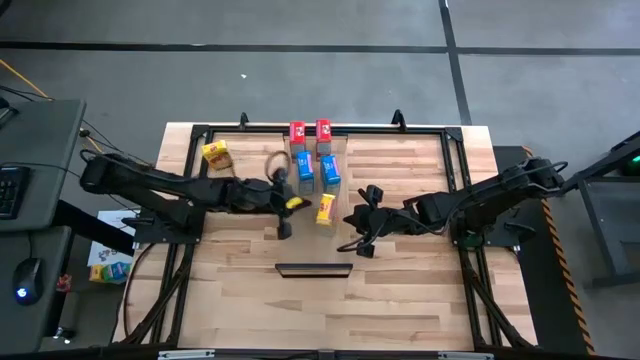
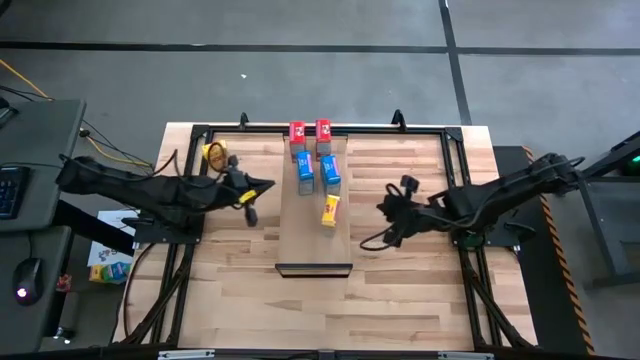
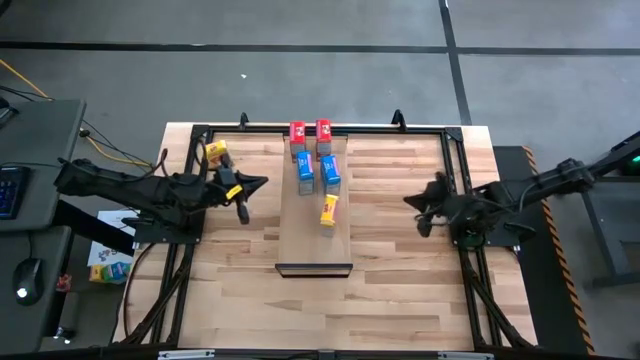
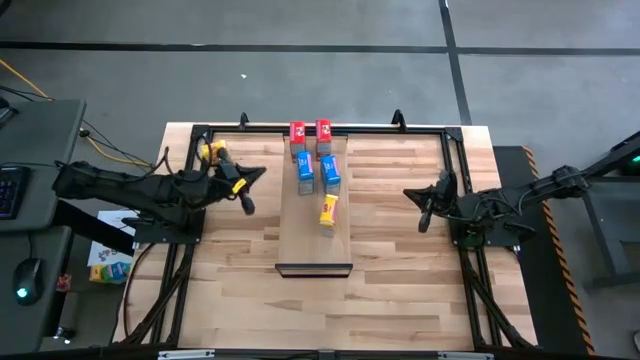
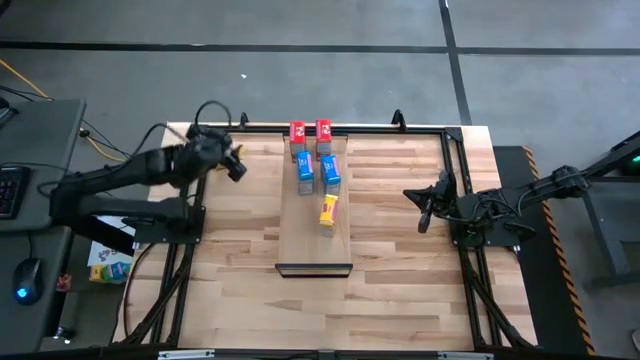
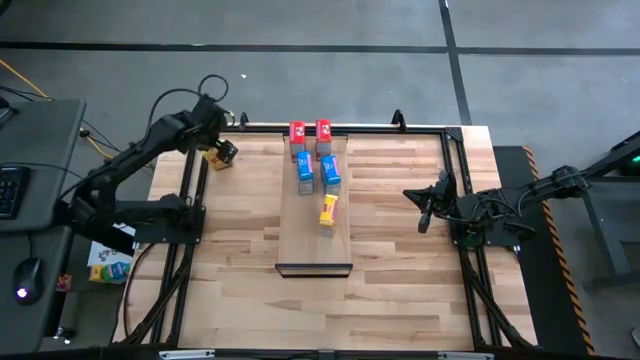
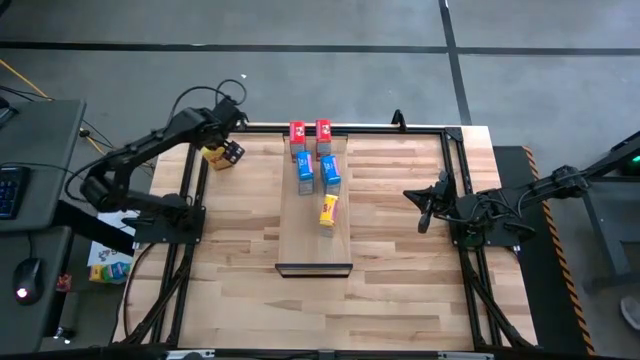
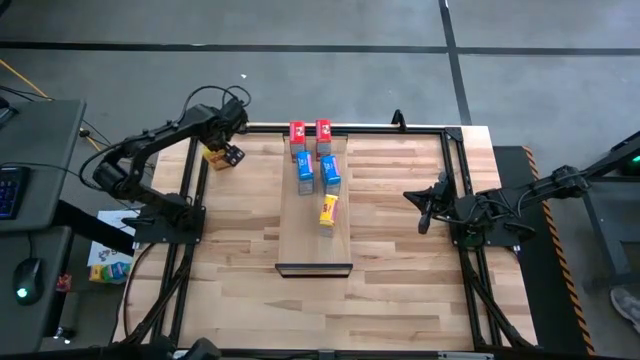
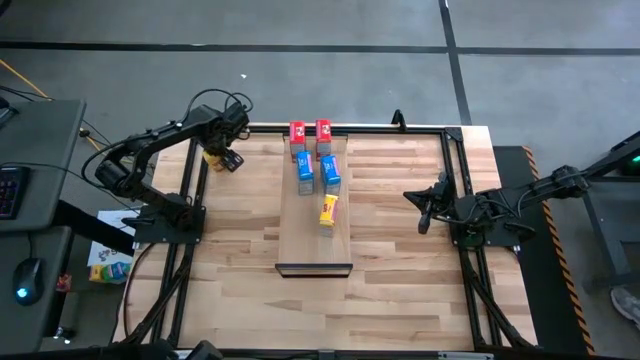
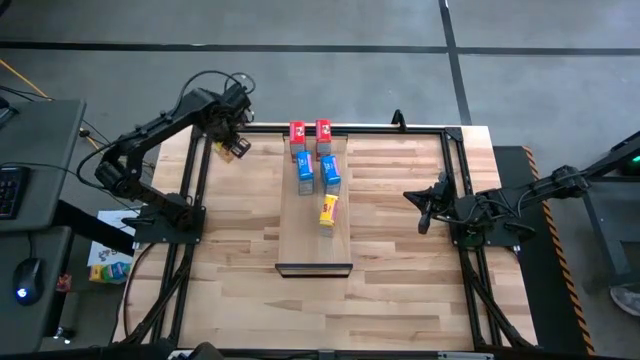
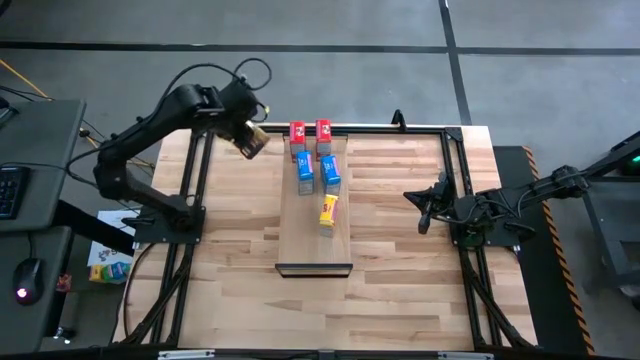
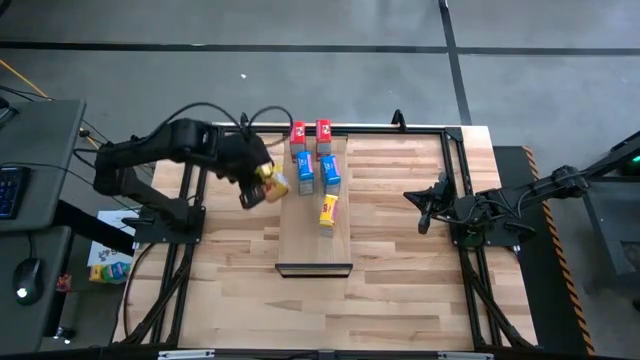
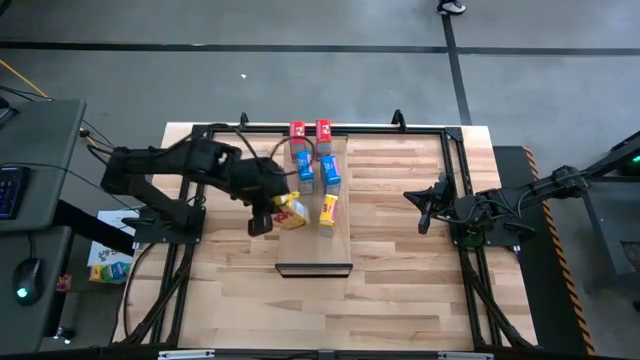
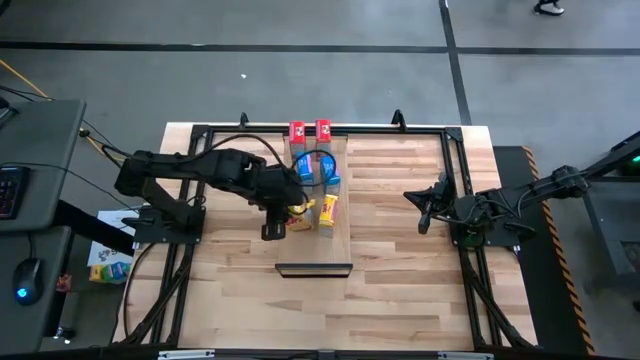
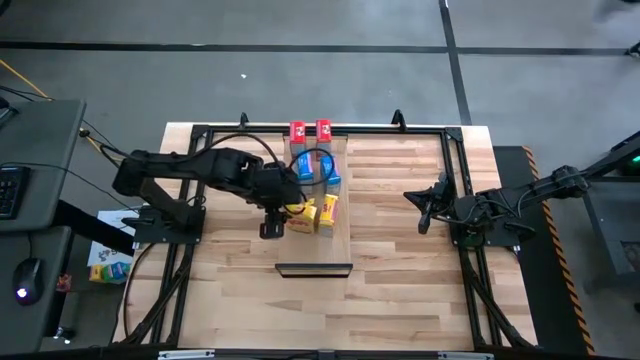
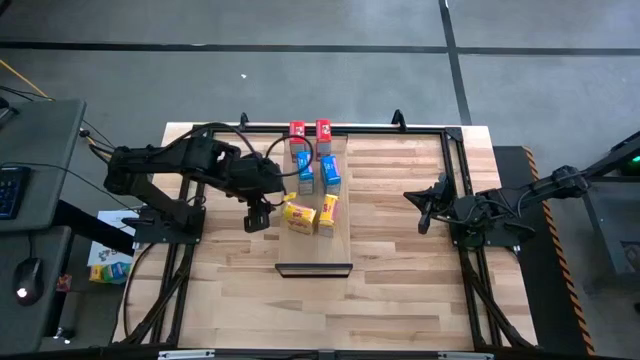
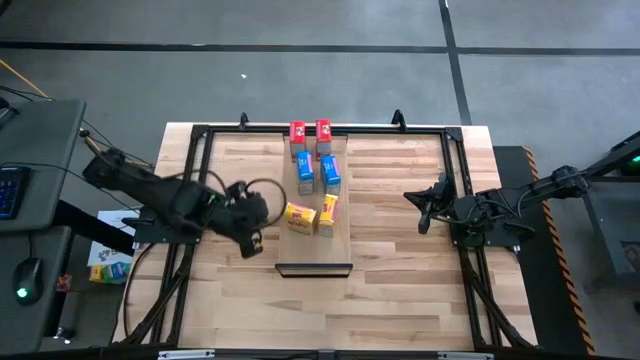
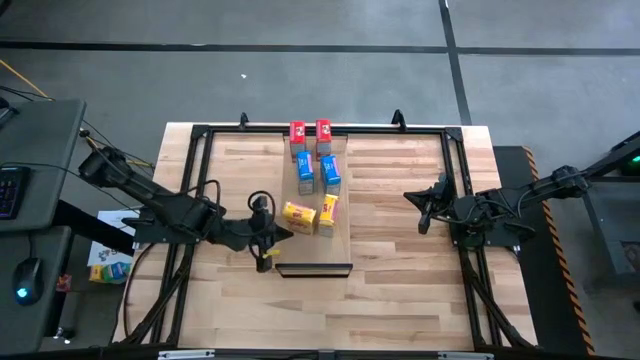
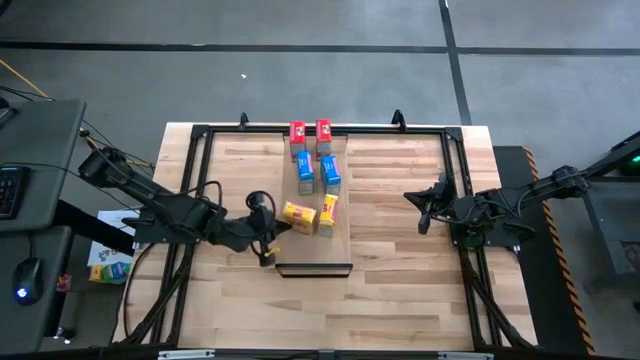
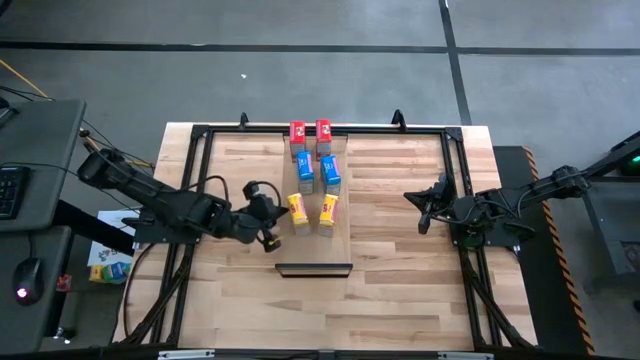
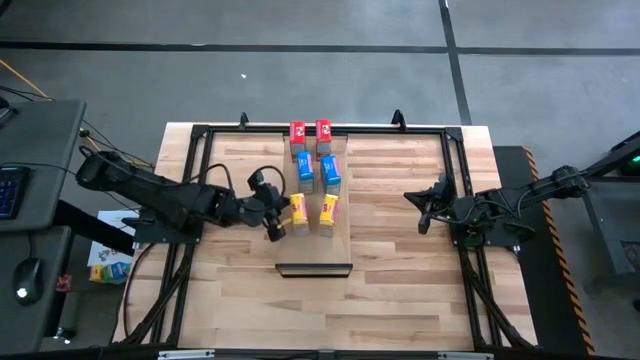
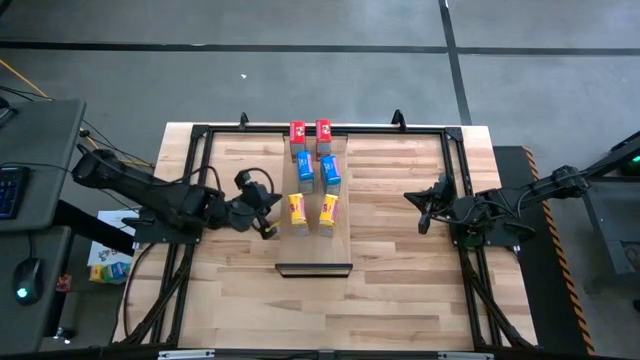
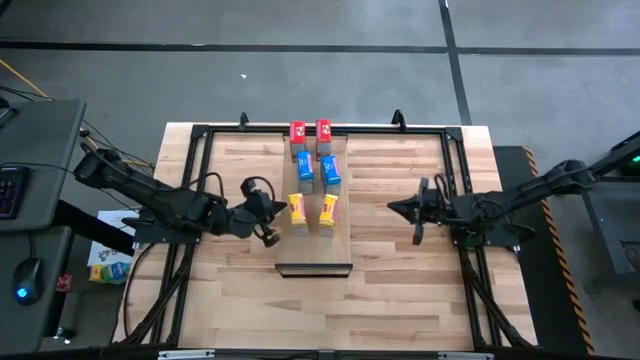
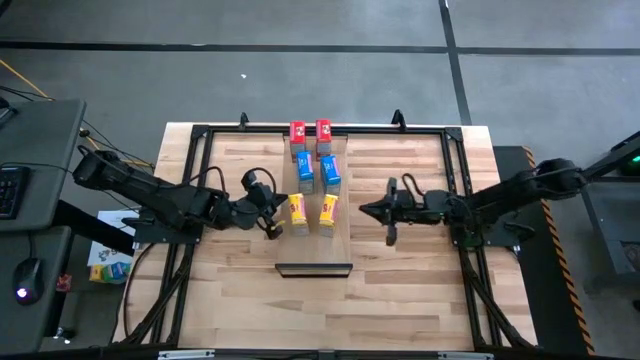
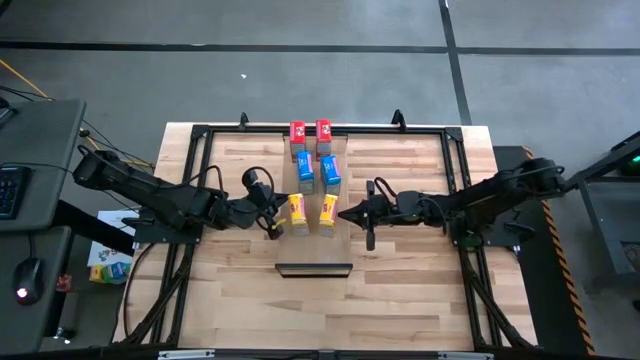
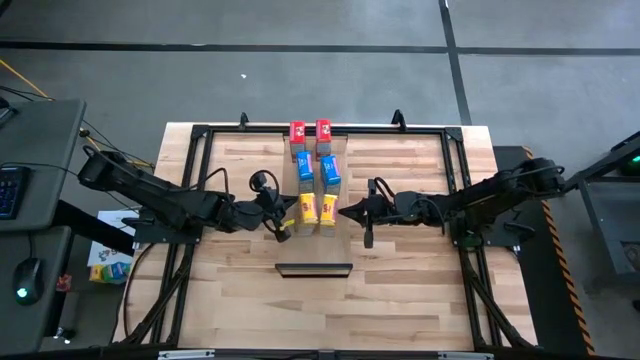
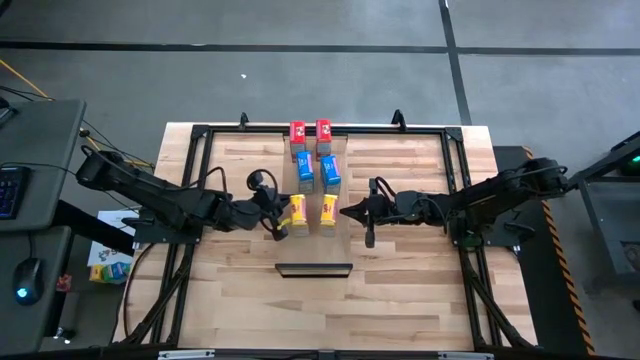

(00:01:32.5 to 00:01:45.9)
Task: Stack cereal on shelf
Put the yellow cereal box and aligned with the yellow cereal box on the shelf

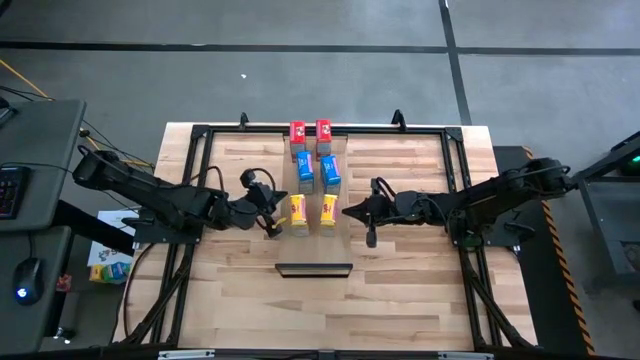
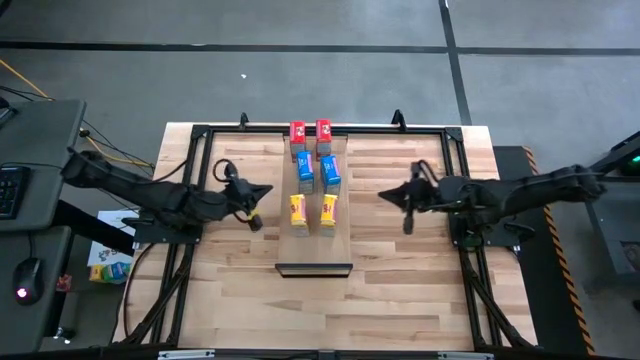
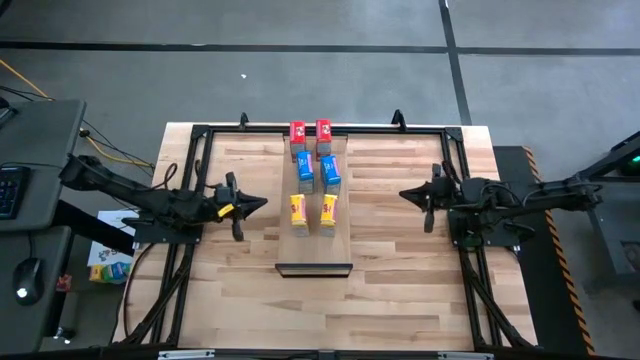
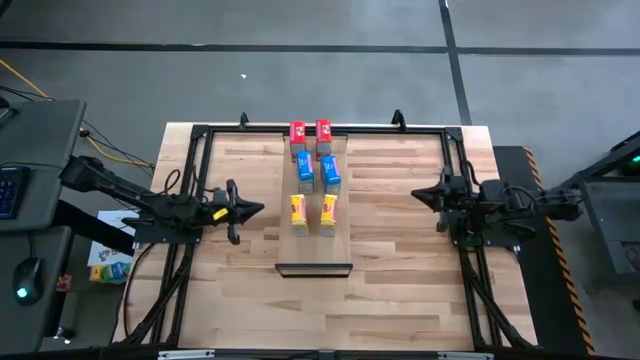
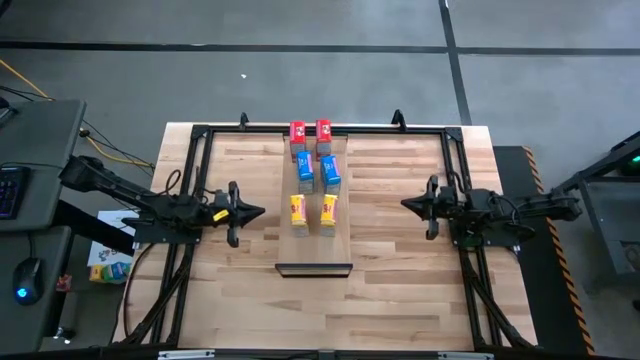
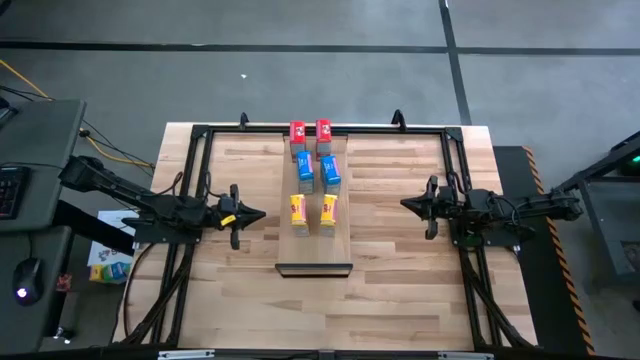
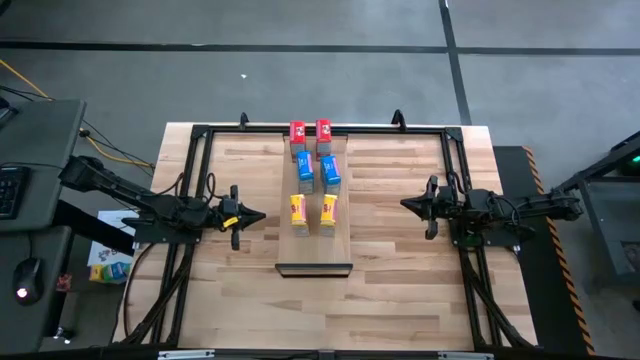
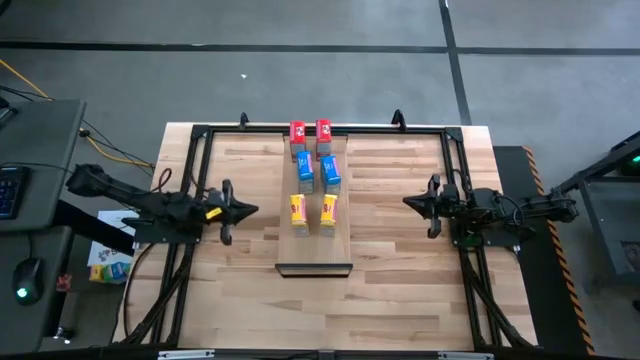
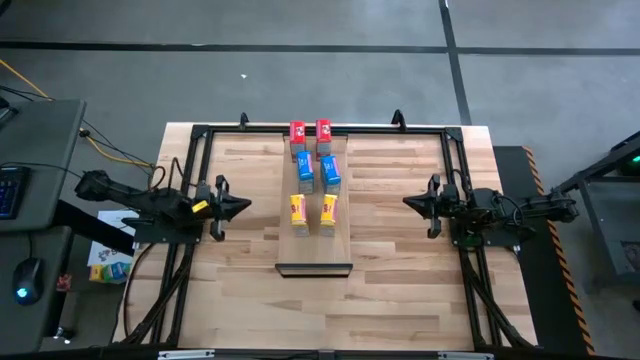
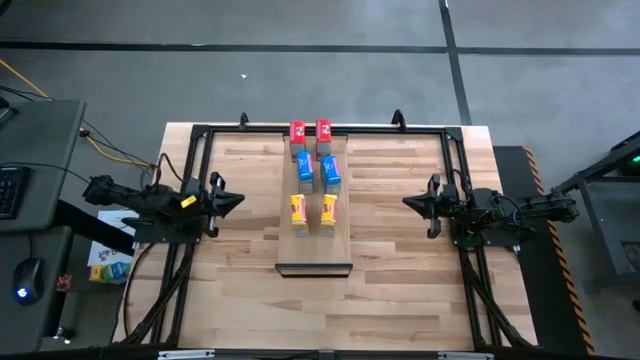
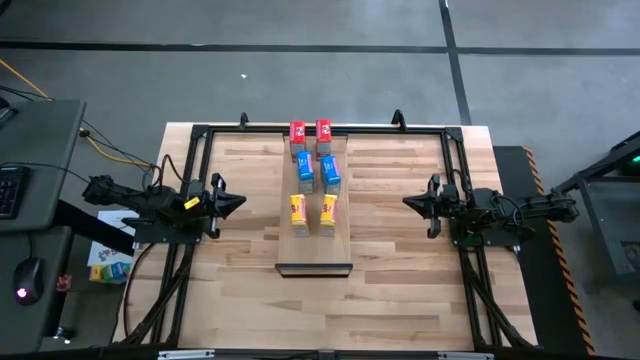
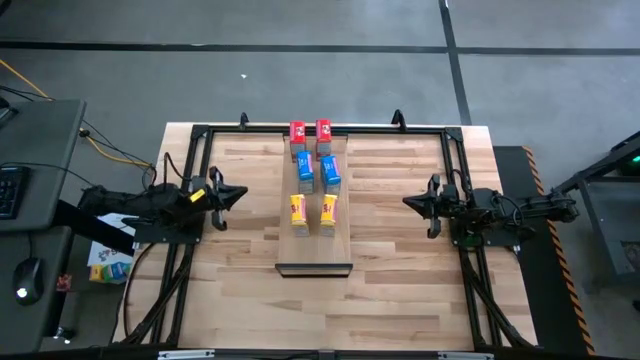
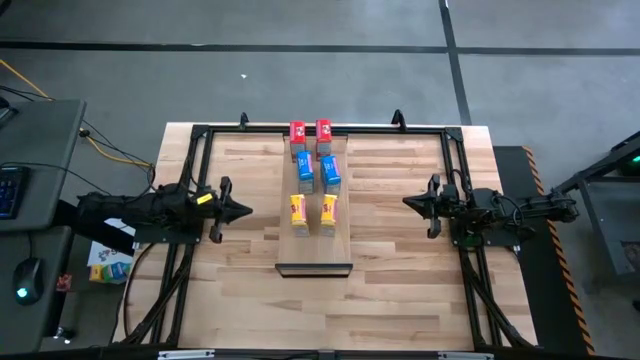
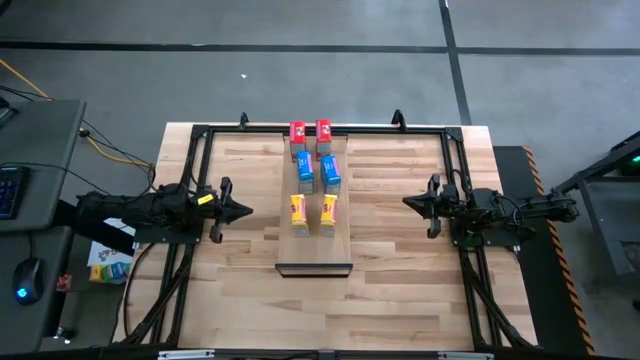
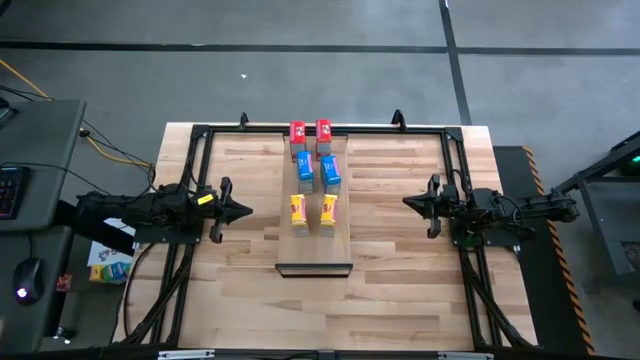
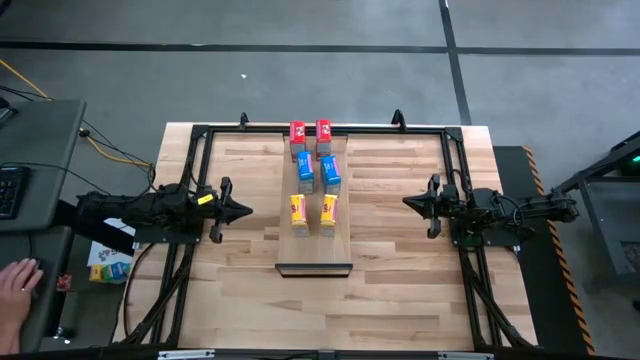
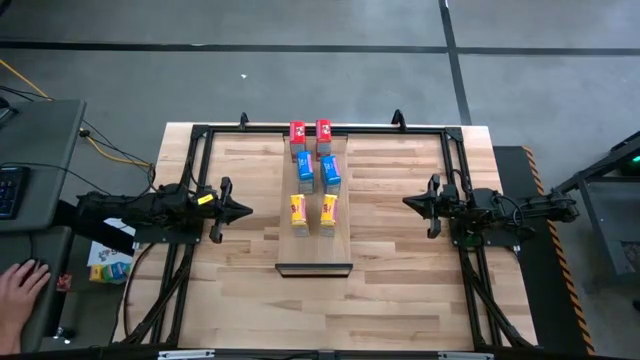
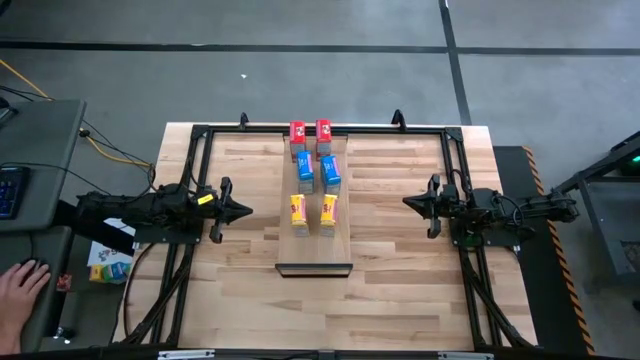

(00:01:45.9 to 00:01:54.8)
Return to Home Position
